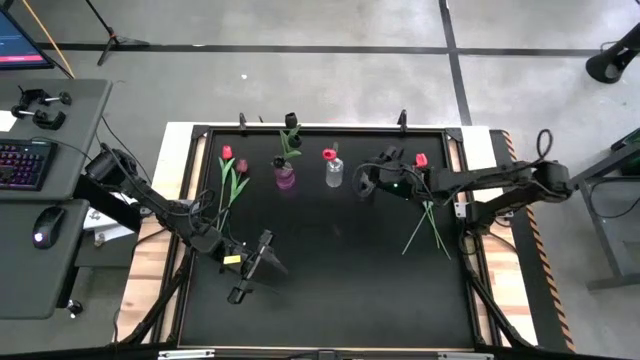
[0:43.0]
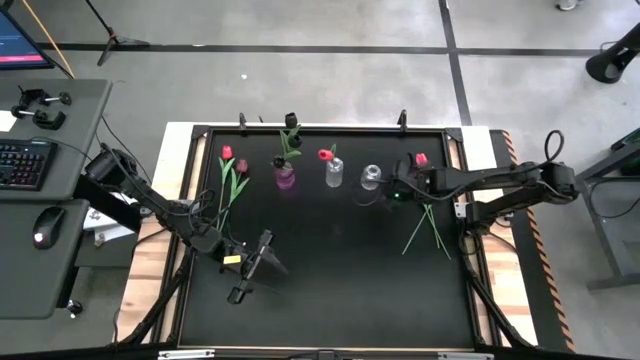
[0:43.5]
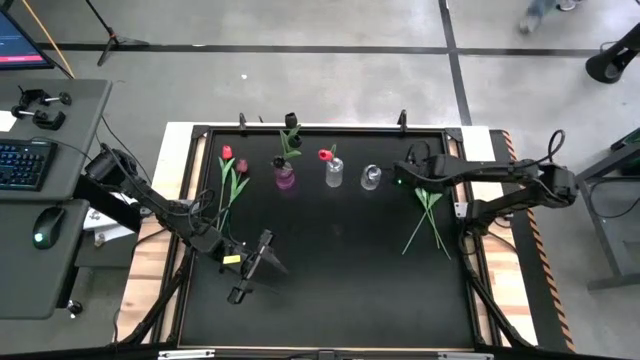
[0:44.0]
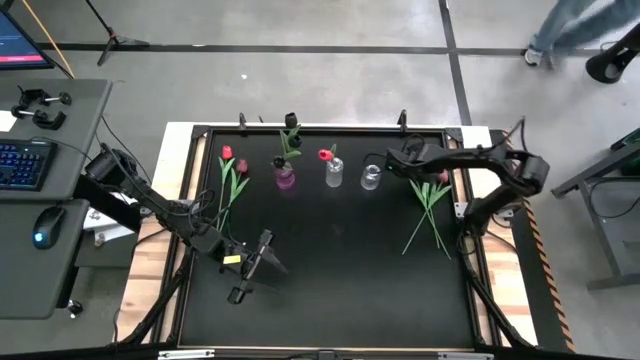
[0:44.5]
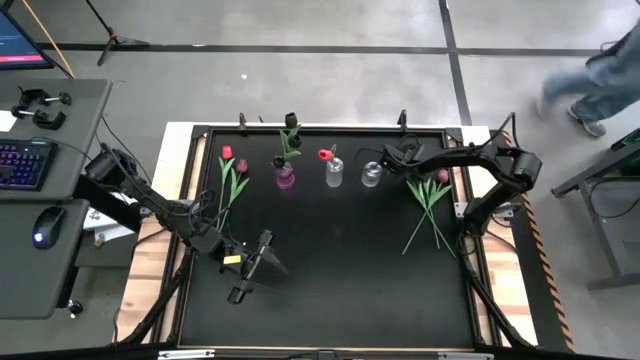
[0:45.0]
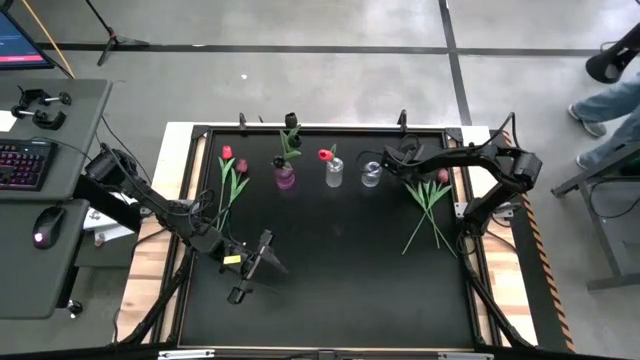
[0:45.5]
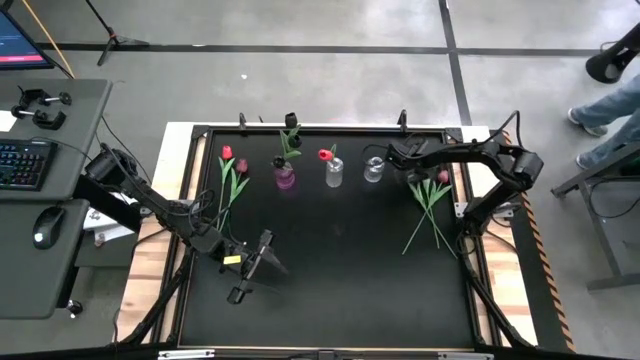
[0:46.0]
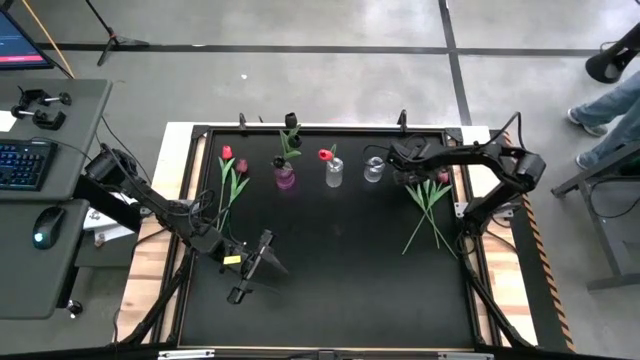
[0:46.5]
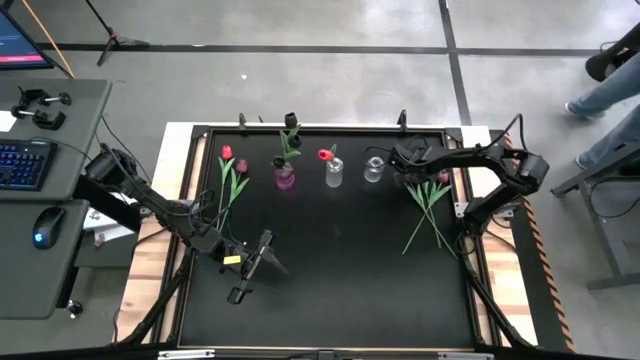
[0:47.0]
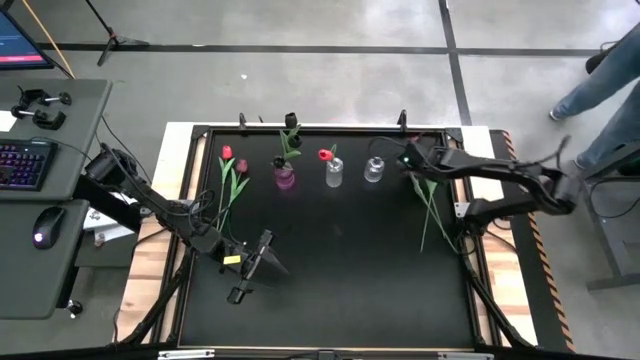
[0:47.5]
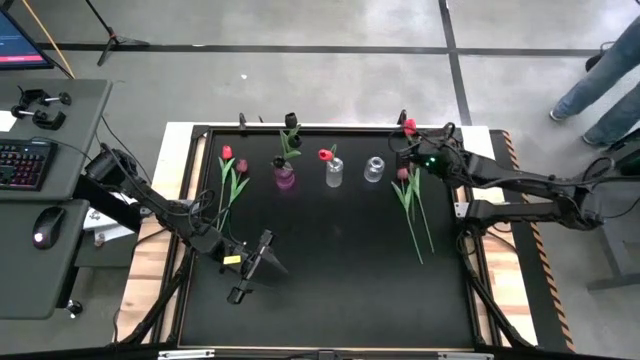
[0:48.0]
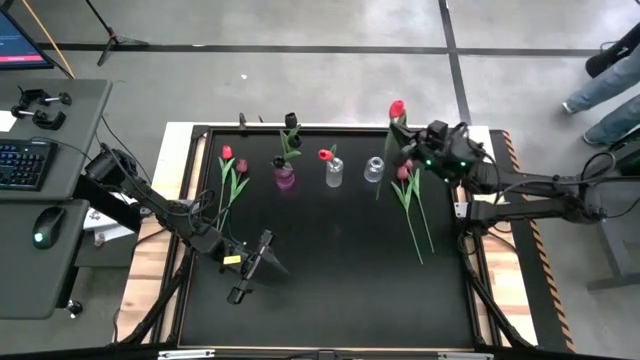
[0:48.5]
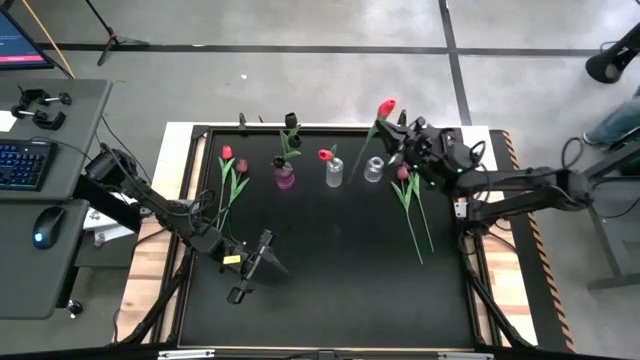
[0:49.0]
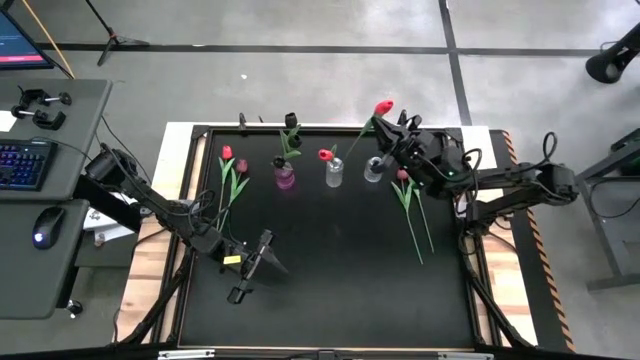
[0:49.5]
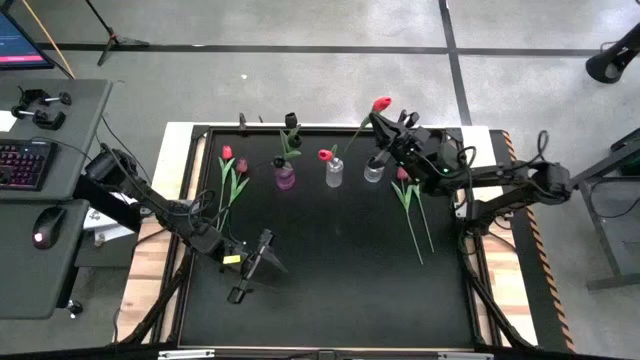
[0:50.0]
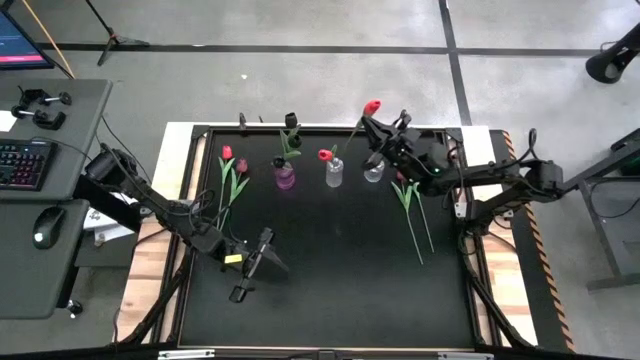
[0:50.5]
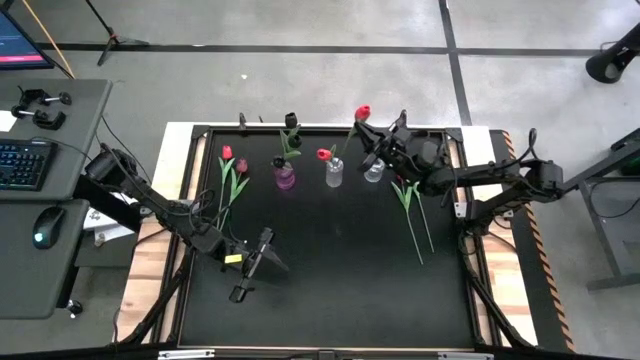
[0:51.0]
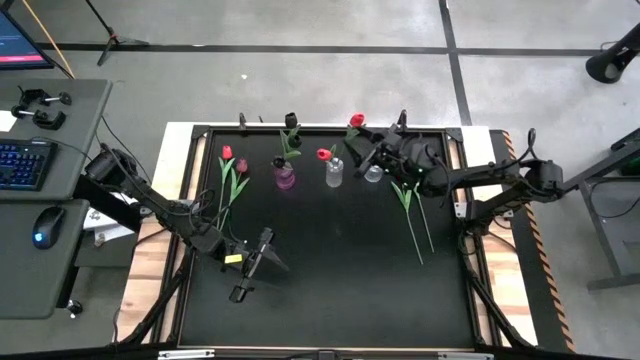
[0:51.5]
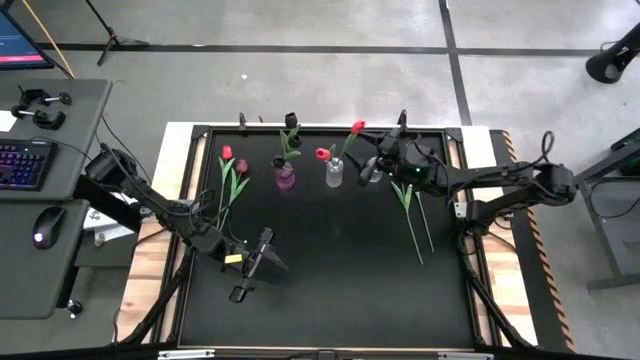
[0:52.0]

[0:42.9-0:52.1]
Task: Sort flowers into vase by color
Put the right pink tulip into the left transparent vase

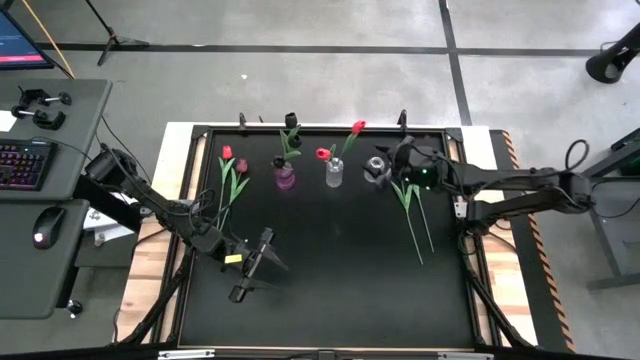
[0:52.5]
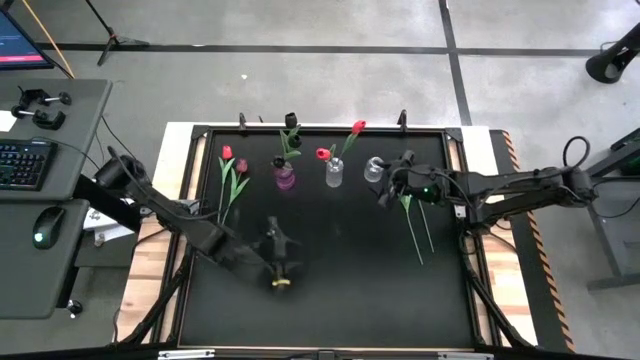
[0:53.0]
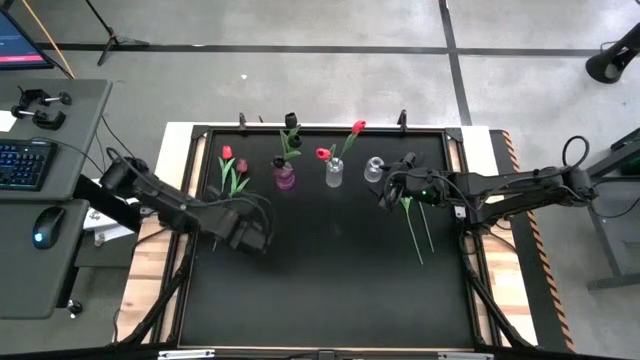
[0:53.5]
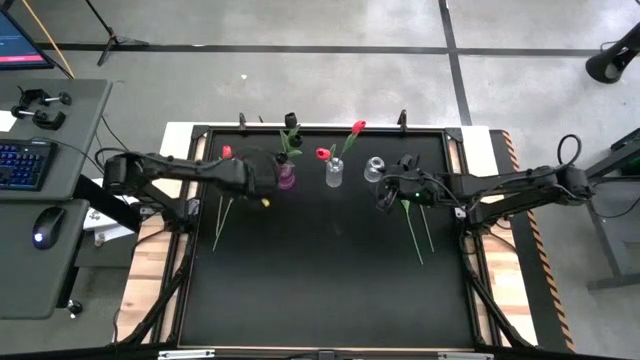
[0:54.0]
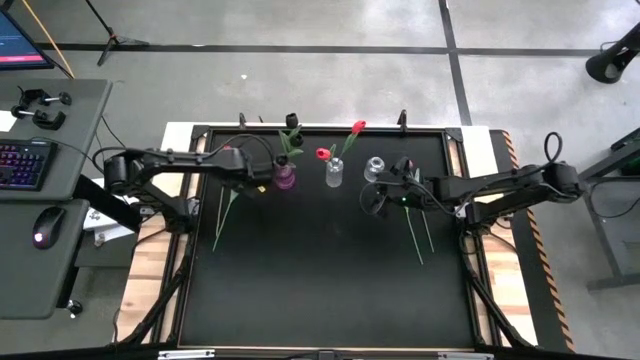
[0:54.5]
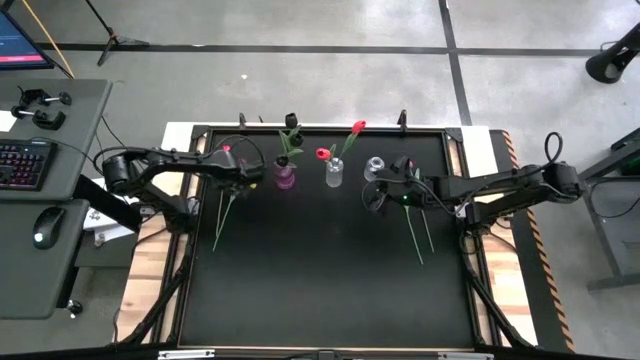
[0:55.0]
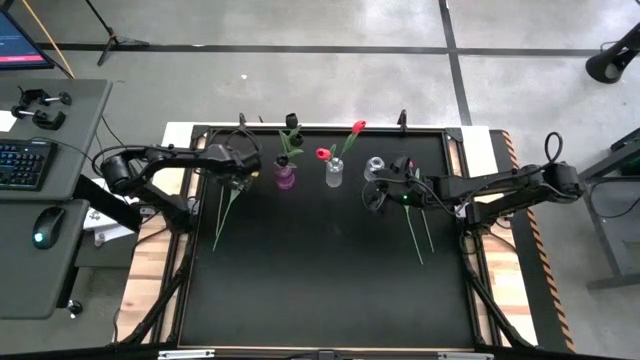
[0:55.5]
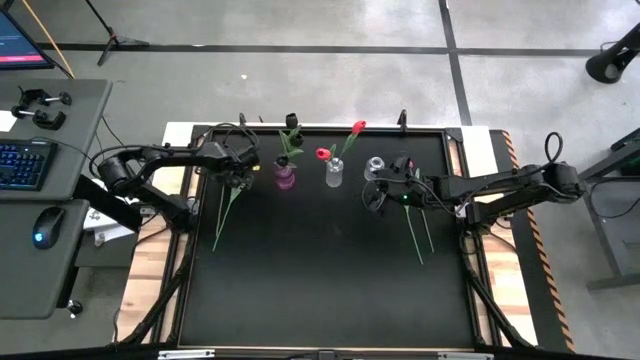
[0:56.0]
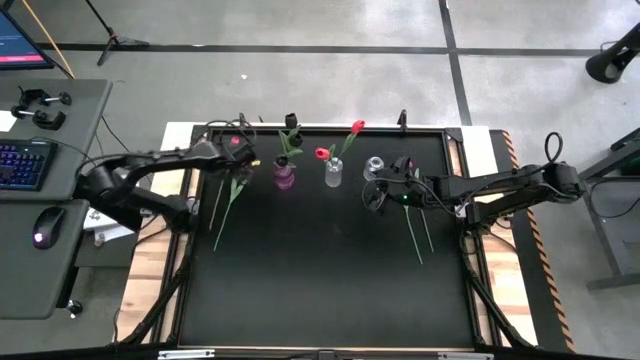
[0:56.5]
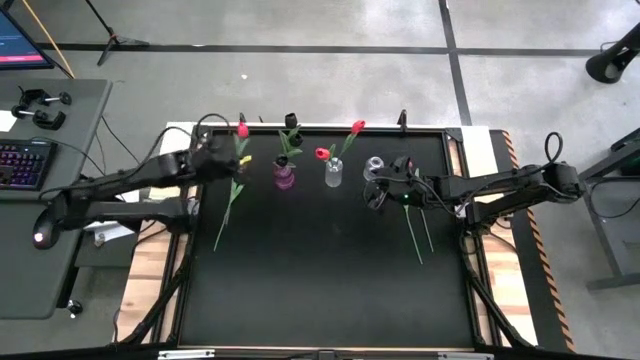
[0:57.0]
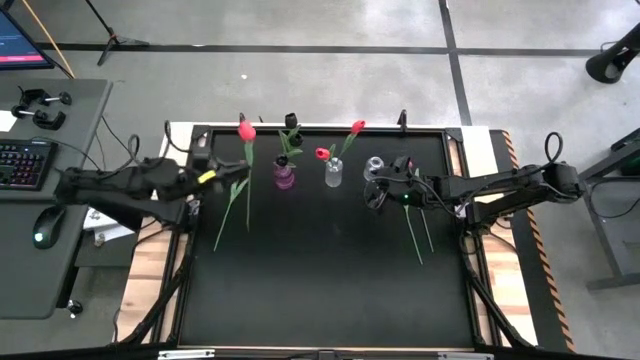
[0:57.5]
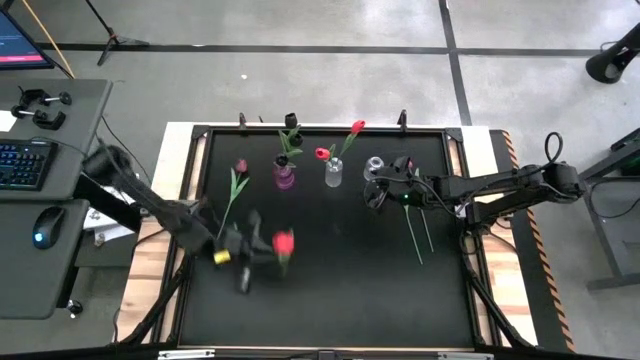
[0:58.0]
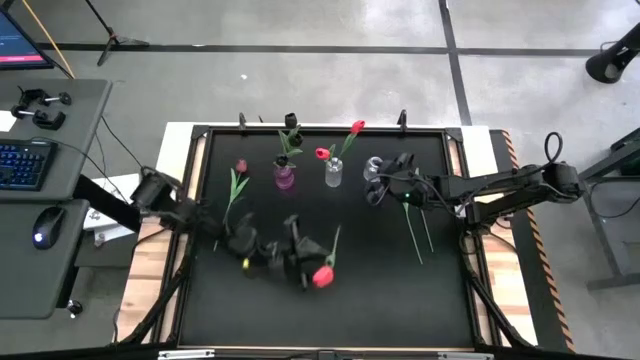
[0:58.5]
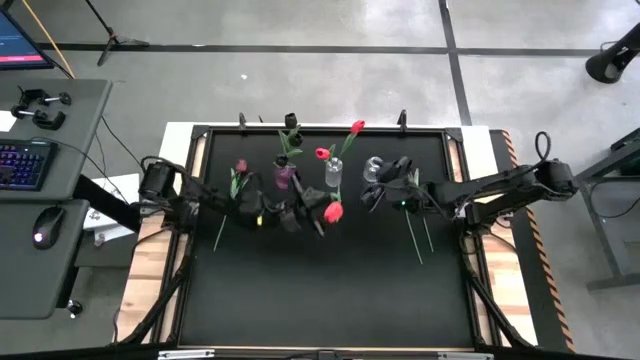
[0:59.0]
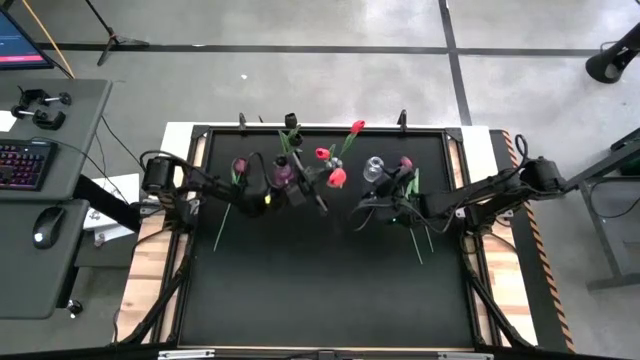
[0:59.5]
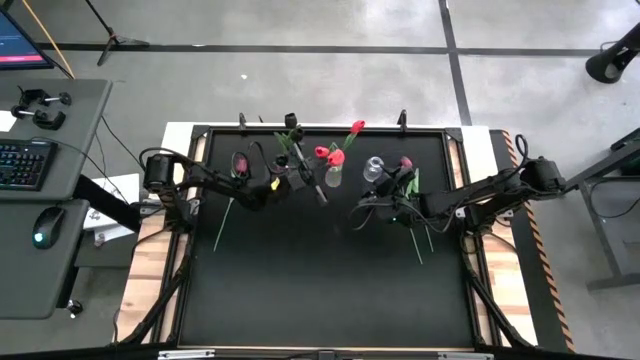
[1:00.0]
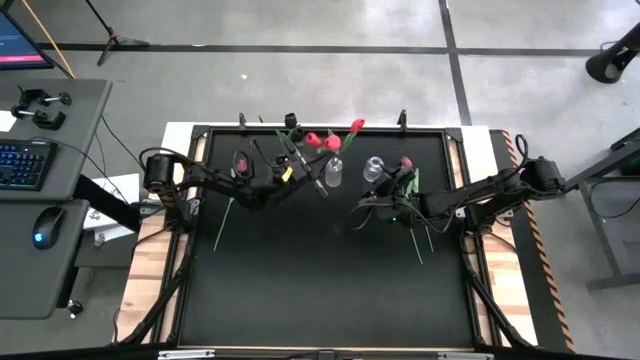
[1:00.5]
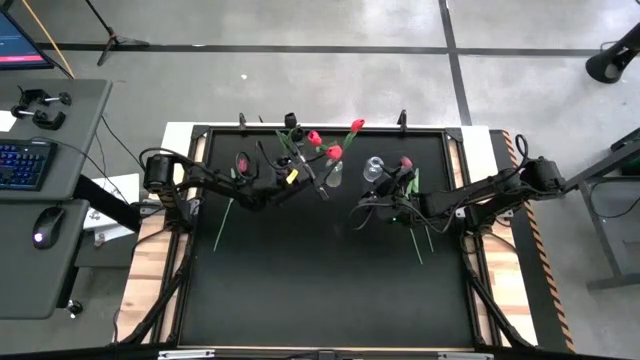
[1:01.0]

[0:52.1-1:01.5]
Put the pink tulip into the left transparent vase

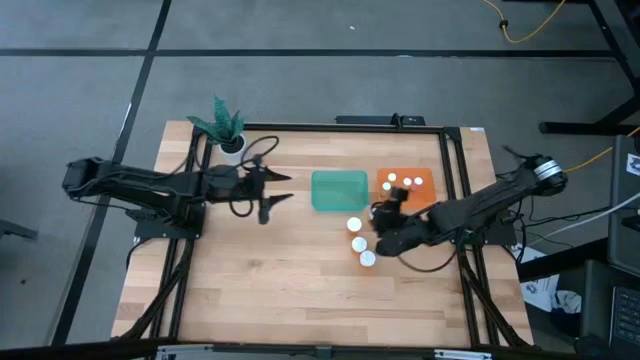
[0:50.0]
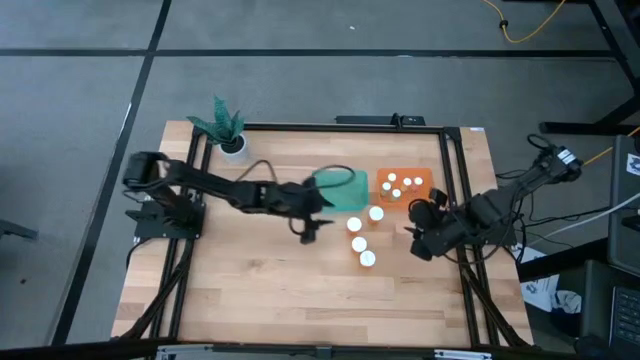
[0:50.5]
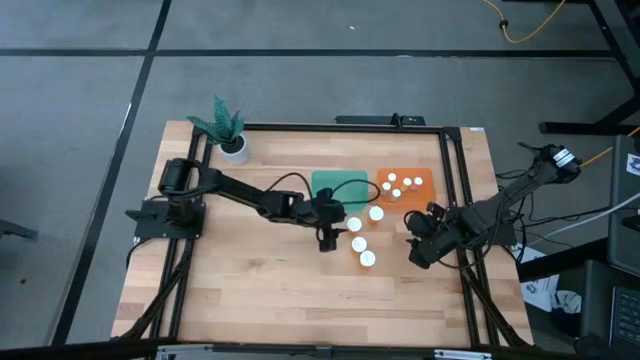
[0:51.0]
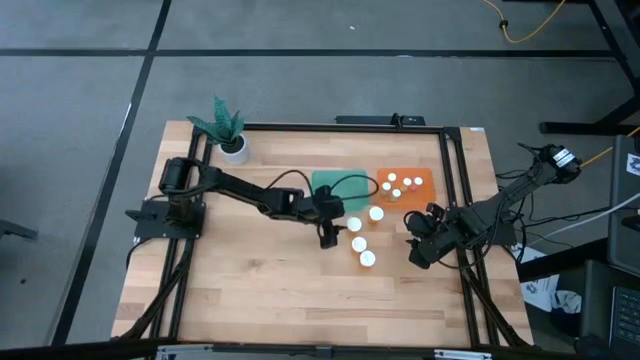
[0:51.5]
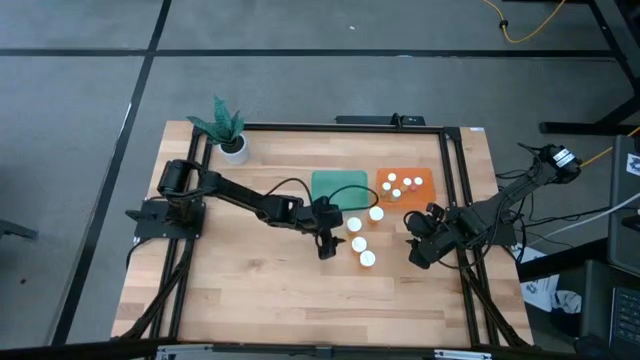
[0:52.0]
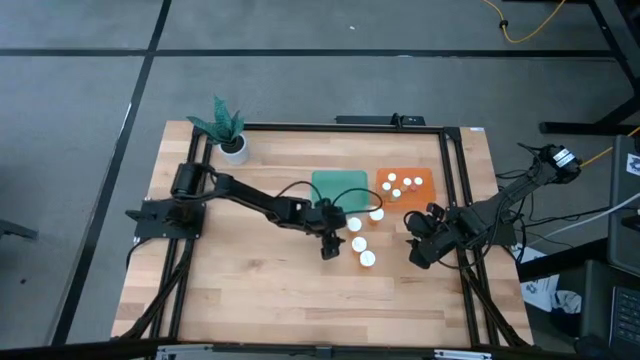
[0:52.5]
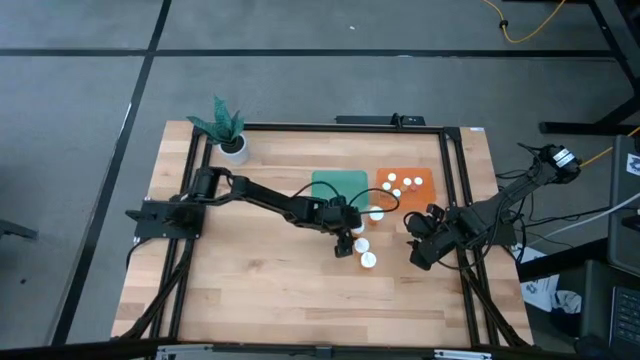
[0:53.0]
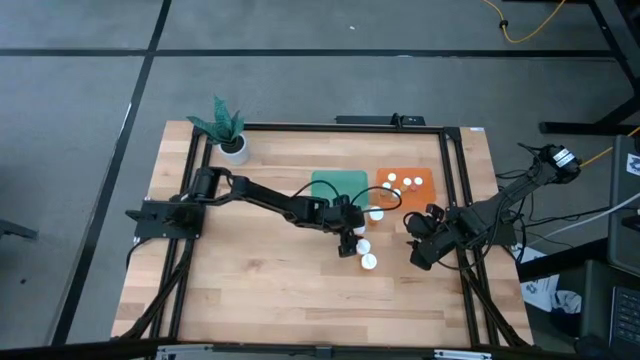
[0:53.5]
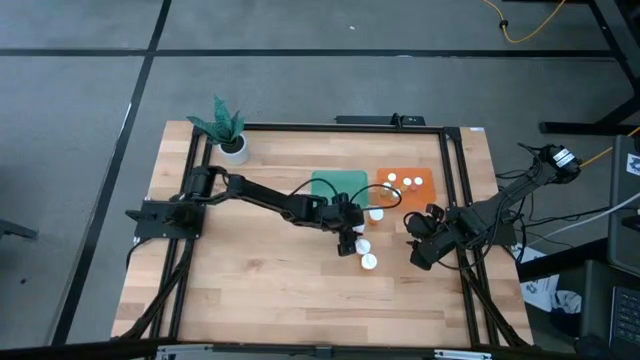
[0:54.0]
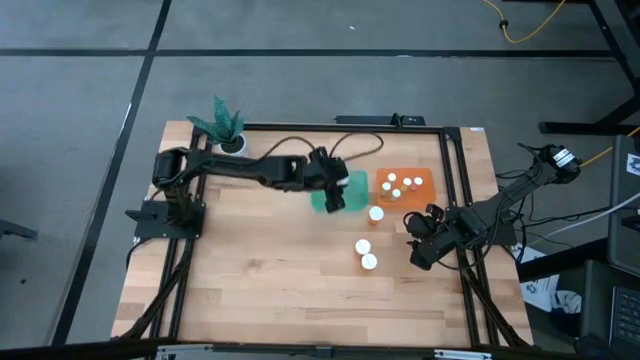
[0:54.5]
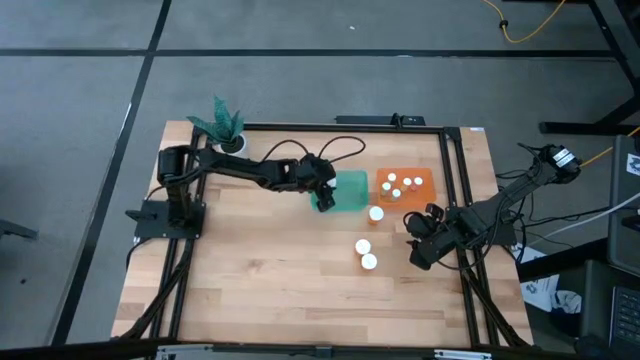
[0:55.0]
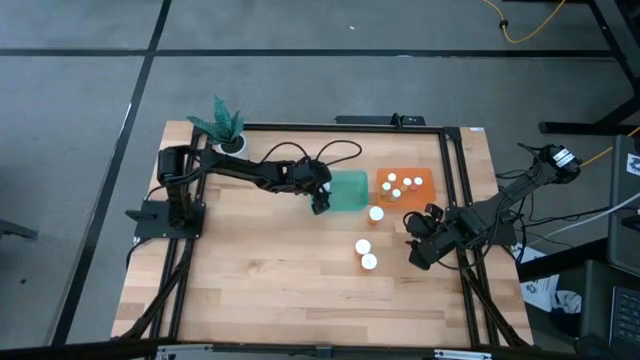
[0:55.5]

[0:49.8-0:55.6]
Task: Pick and place medicine bottles into bin by pill shape (circle, oval)
Put the orange pill bottle into the green bin
